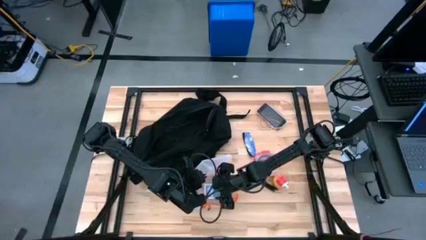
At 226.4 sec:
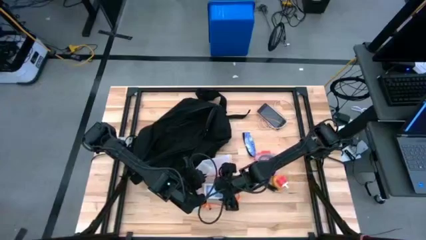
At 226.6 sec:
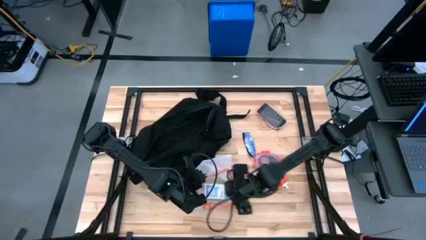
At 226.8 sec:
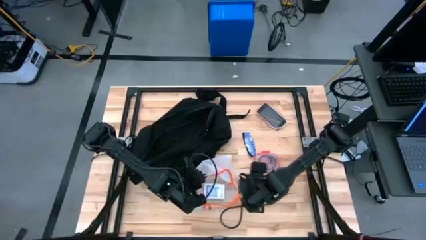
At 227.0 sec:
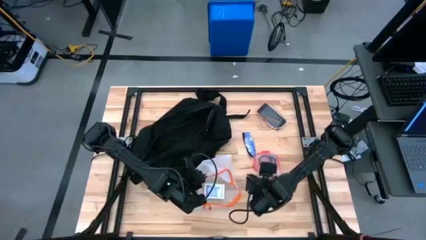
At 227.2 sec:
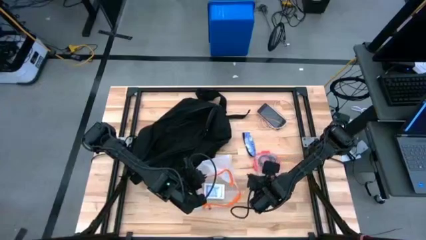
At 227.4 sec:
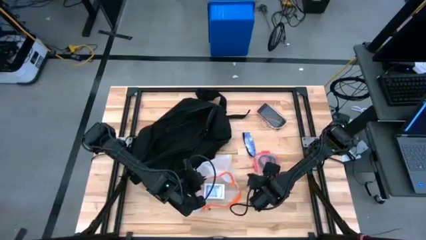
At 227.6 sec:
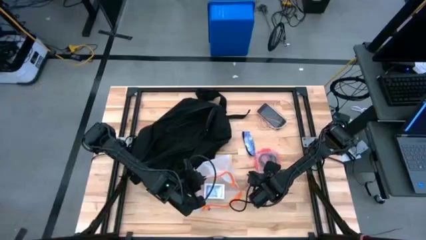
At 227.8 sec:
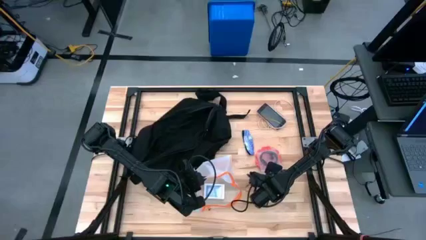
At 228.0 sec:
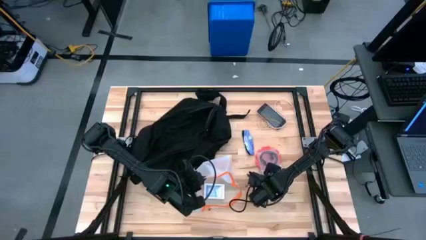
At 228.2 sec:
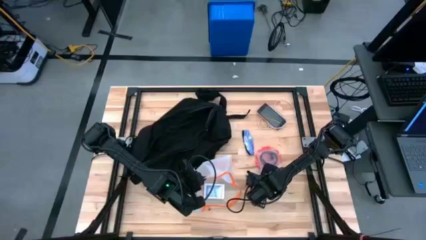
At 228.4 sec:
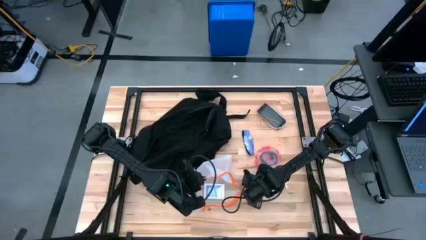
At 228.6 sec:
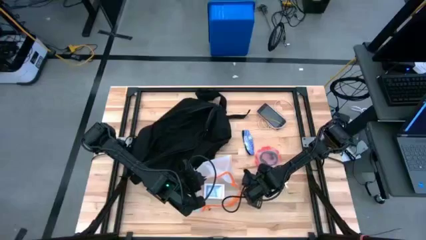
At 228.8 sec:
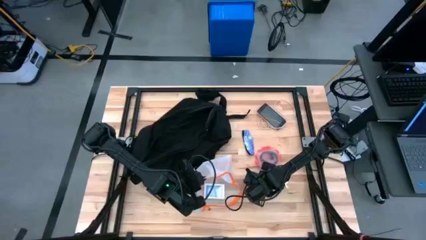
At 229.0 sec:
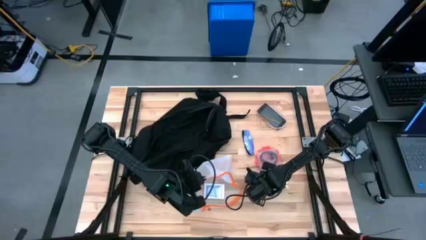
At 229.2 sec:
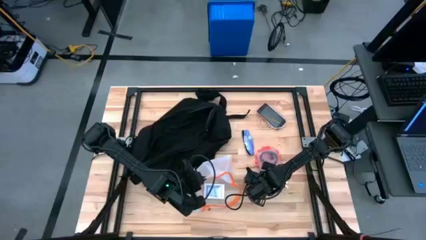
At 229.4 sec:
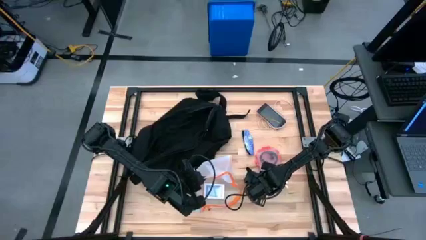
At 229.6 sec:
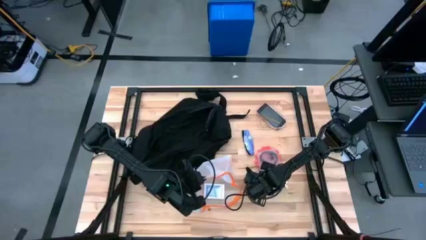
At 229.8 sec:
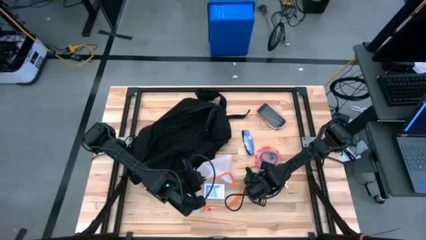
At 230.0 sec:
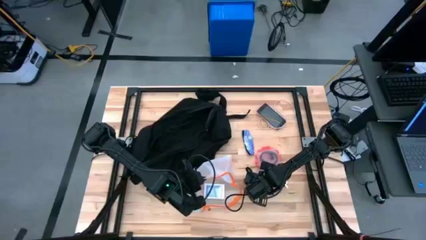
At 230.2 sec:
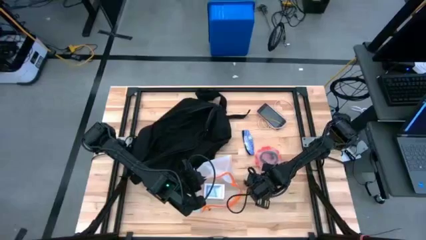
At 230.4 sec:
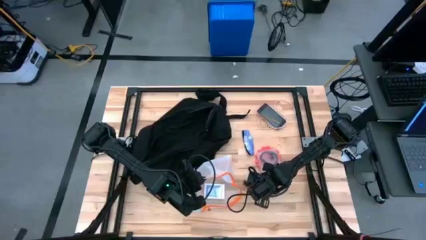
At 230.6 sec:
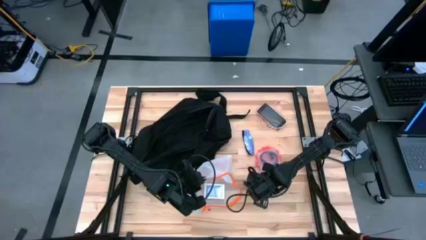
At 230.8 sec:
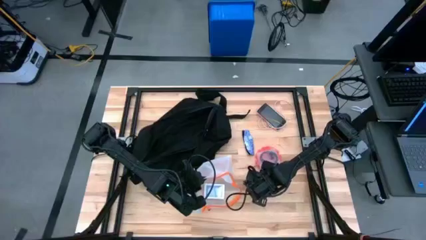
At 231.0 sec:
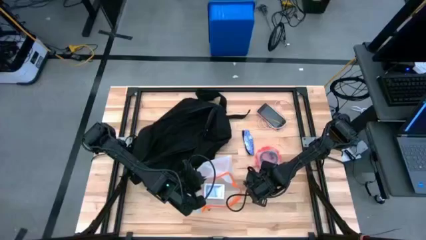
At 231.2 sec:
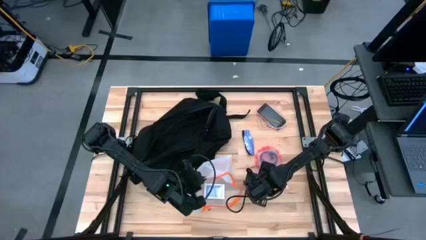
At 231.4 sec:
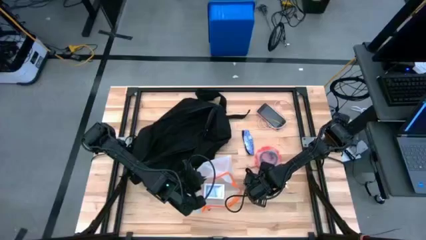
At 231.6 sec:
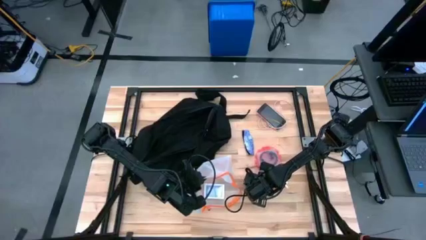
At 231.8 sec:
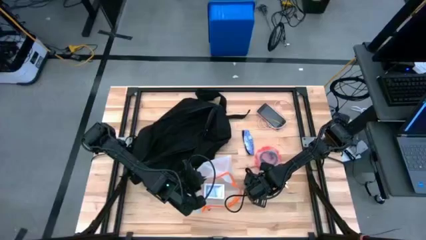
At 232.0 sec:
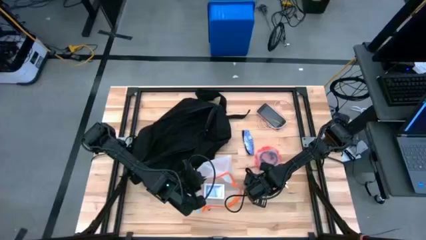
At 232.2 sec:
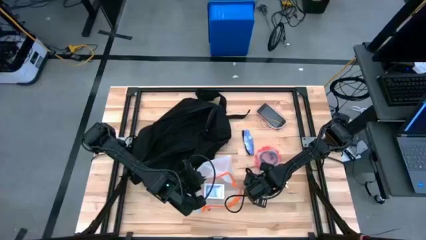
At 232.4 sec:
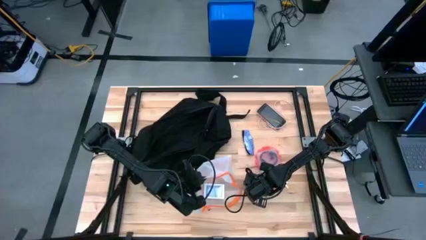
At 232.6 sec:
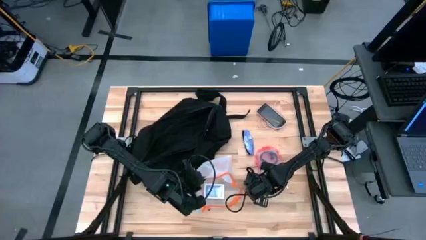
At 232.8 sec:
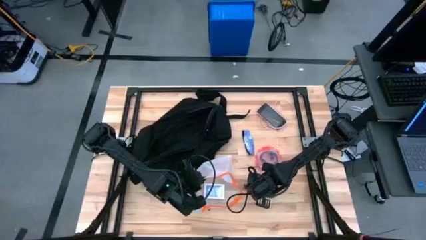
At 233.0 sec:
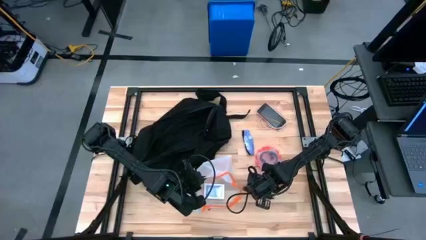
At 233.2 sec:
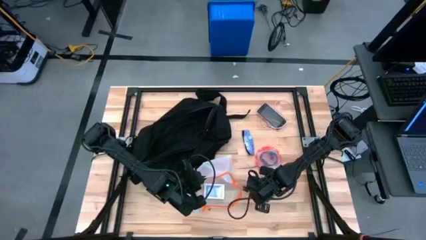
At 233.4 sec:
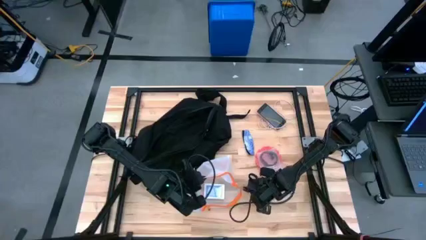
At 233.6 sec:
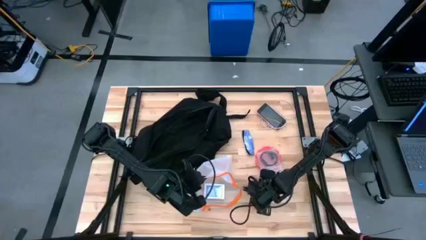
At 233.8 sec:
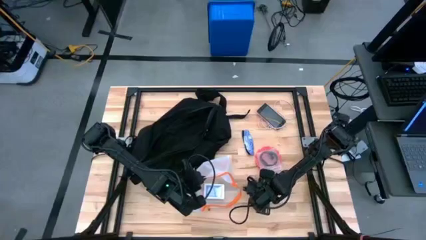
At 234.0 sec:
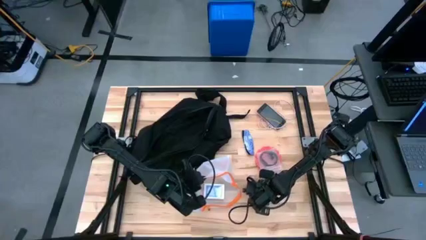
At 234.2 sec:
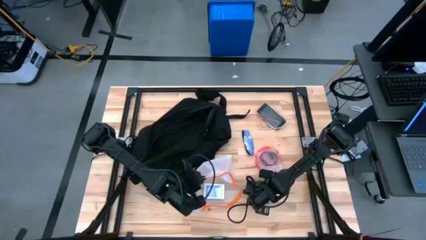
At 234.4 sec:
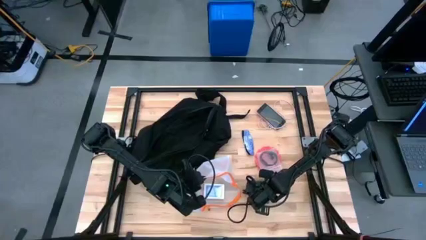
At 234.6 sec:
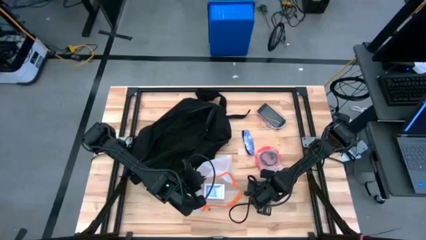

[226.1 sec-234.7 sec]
Task: Unpack backpack
Put the black pen into the orange zip bag

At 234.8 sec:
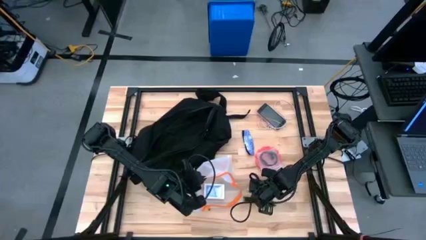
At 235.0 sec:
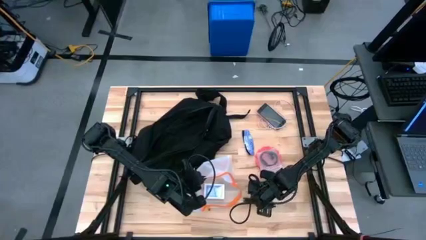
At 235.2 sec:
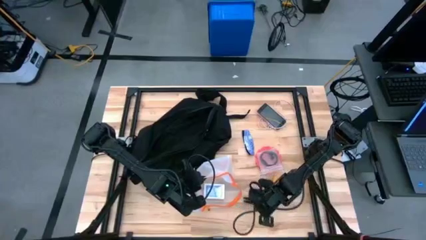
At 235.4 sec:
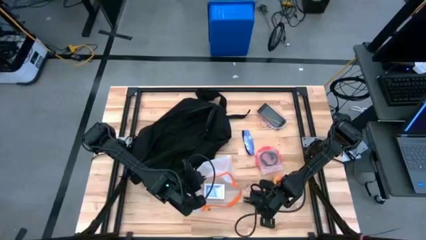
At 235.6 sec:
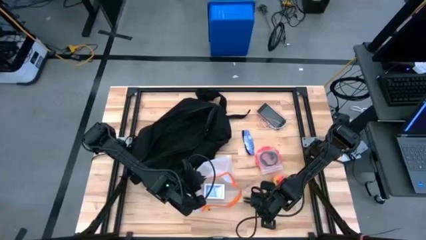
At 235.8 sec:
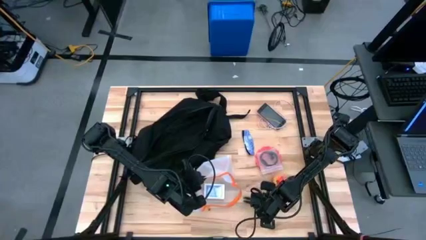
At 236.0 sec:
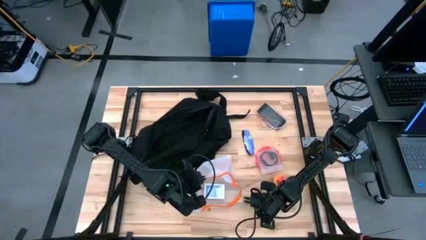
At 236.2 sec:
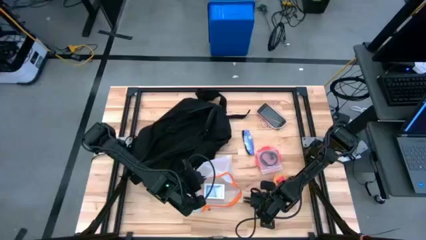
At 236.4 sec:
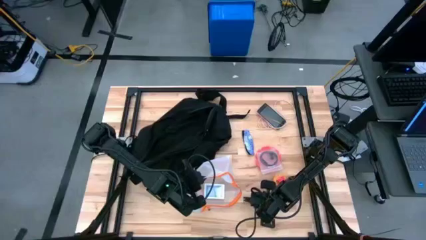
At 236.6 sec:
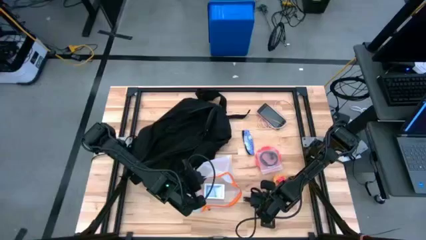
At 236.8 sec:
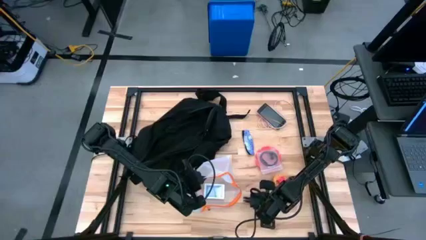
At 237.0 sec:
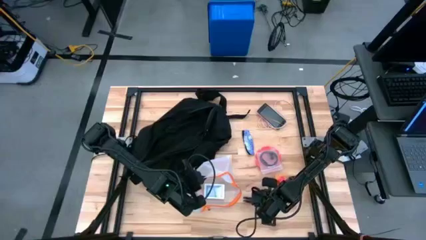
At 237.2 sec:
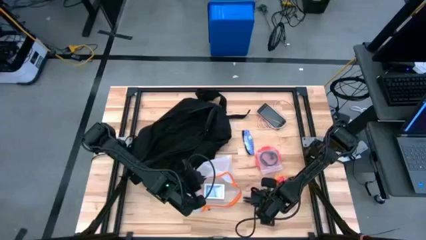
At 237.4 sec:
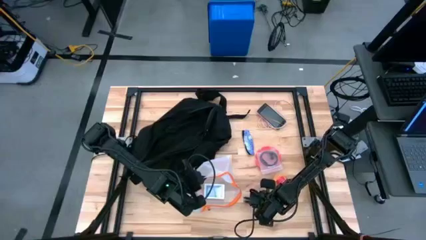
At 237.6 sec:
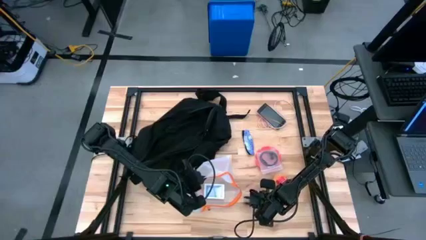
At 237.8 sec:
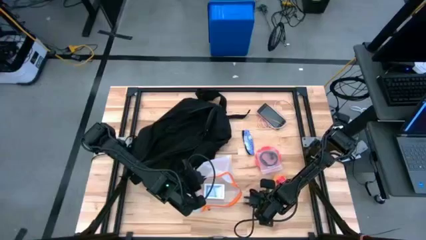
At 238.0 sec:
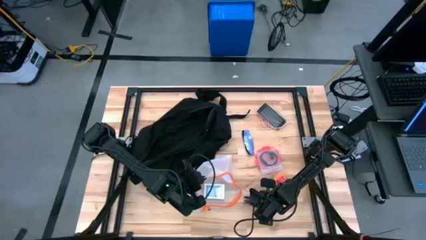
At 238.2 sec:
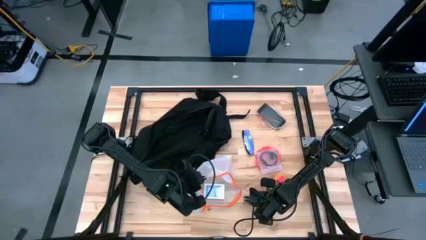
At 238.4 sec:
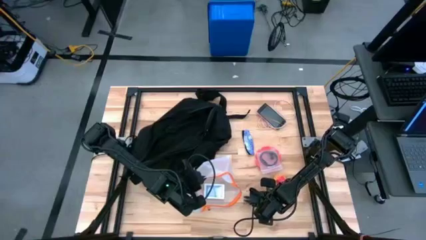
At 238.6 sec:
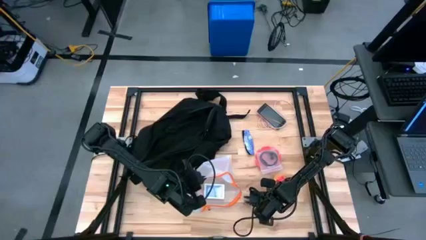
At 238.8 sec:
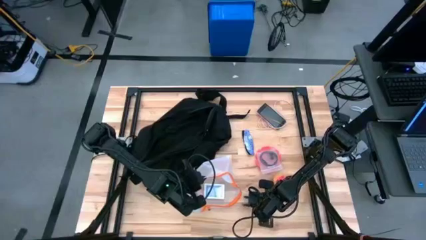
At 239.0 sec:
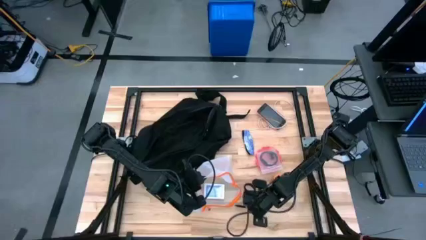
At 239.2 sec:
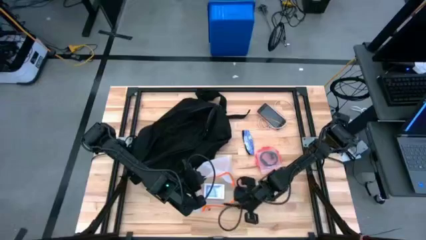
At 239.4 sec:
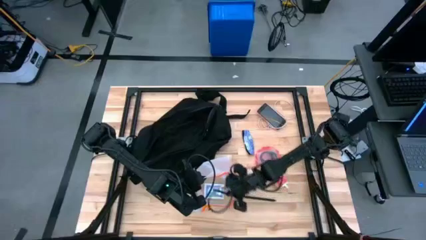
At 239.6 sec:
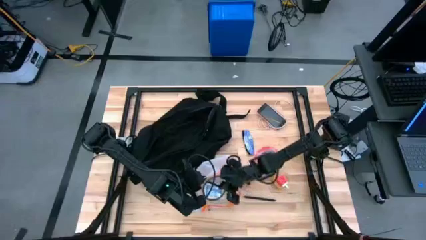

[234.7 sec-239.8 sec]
Put the black pen into the orange zip bag

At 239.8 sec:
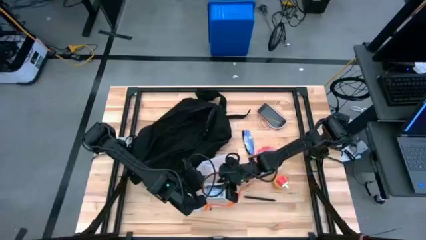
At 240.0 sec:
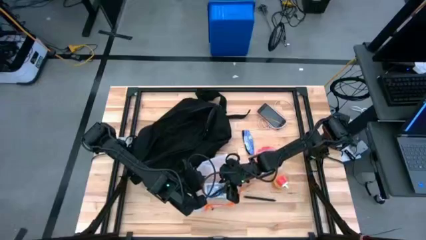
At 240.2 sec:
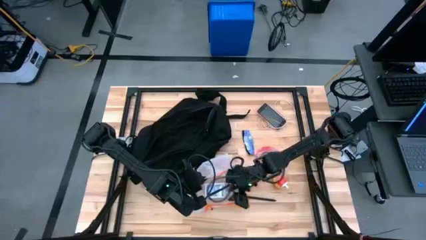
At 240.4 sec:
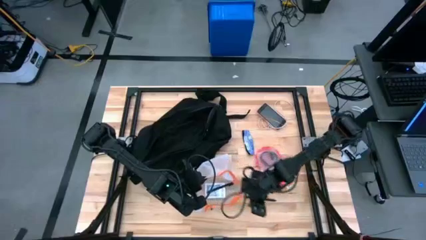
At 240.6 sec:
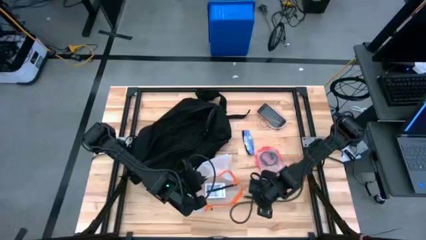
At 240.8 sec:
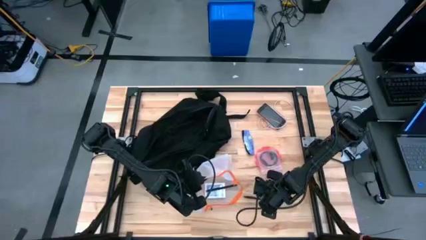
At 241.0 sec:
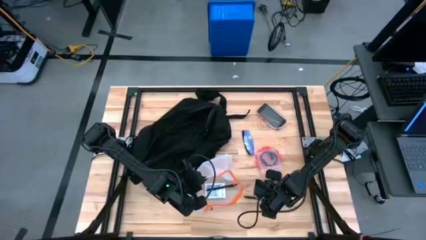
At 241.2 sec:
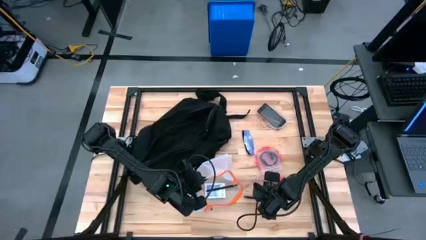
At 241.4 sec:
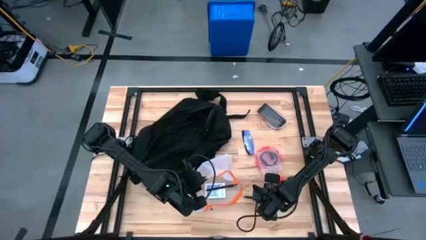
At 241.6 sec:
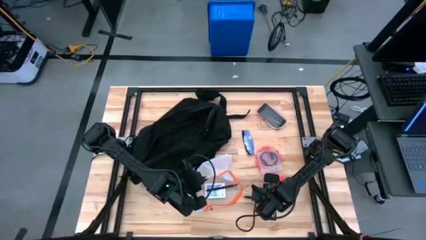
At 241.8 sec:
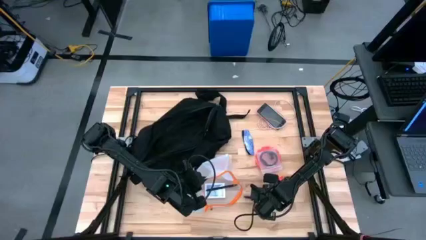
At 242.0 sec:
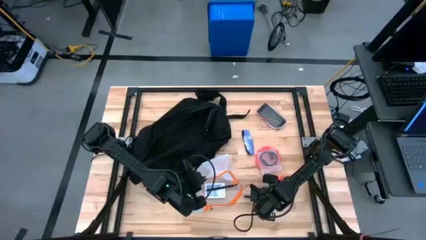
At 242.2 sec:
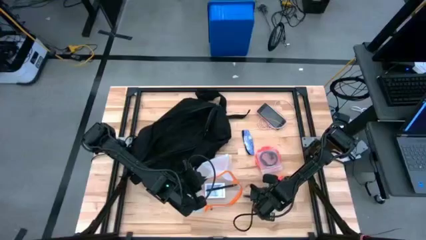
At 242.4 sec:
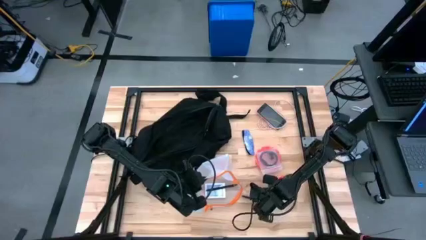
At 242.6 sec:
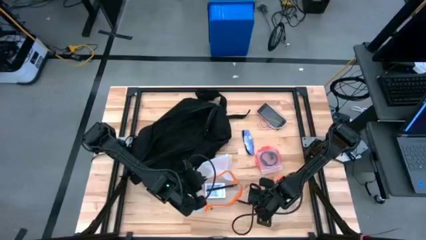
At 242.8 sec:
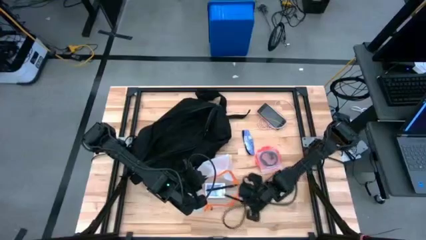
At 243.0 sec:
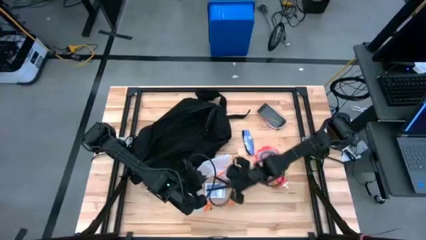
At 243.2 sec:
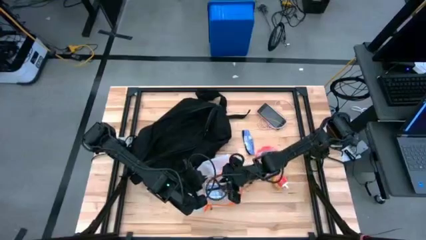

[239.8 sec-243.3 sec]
Put the black pen into the orange zip bag
